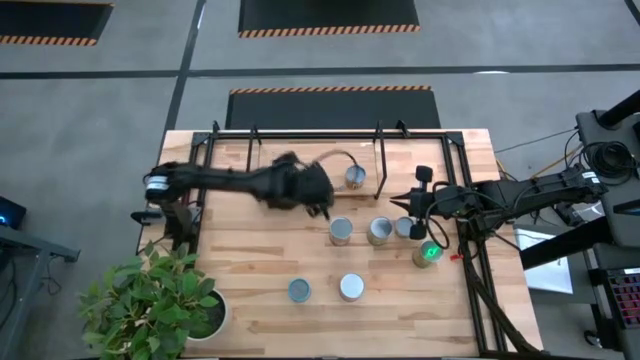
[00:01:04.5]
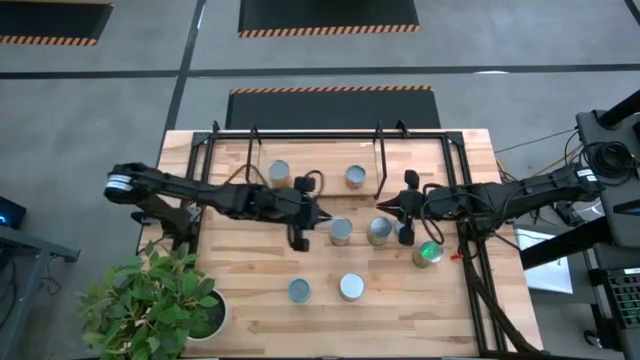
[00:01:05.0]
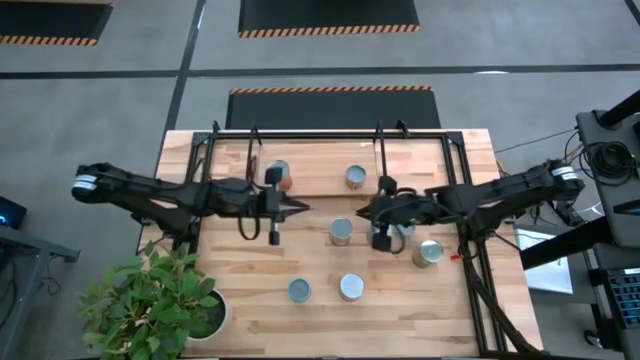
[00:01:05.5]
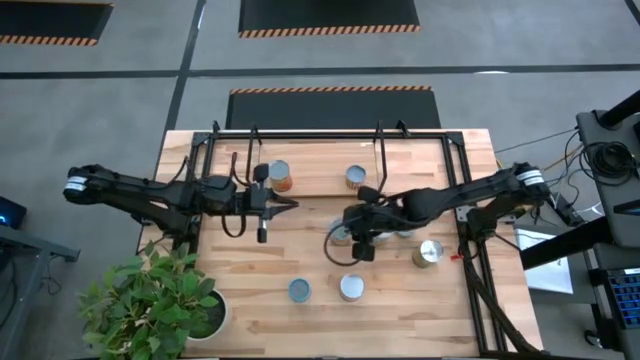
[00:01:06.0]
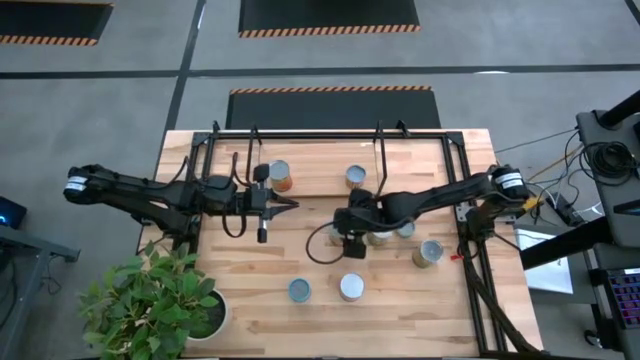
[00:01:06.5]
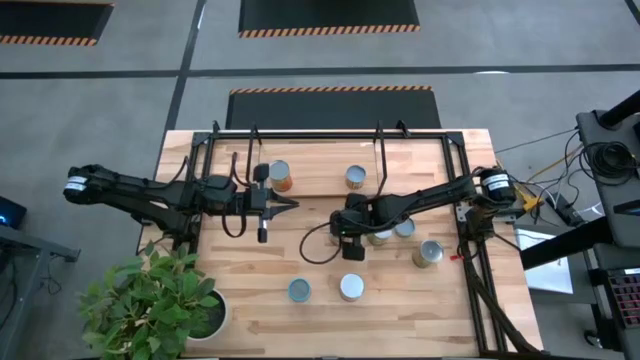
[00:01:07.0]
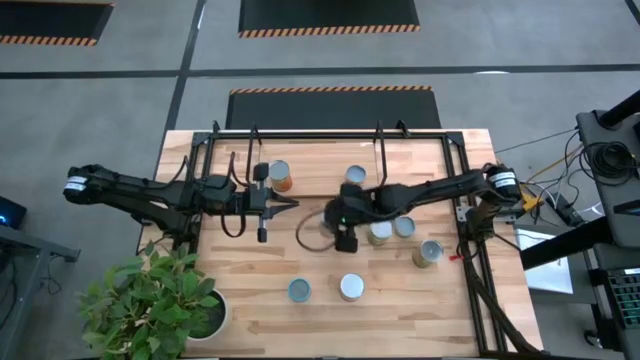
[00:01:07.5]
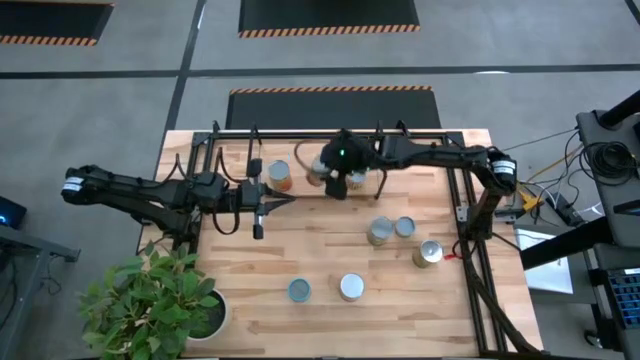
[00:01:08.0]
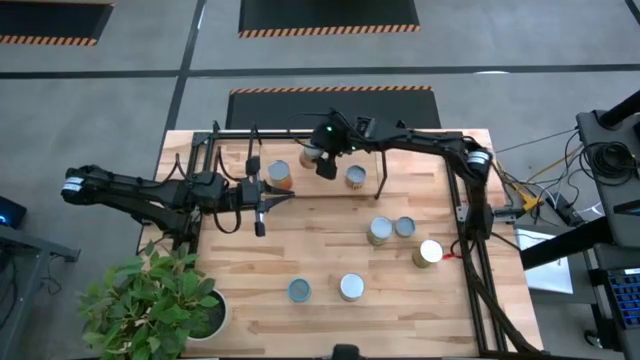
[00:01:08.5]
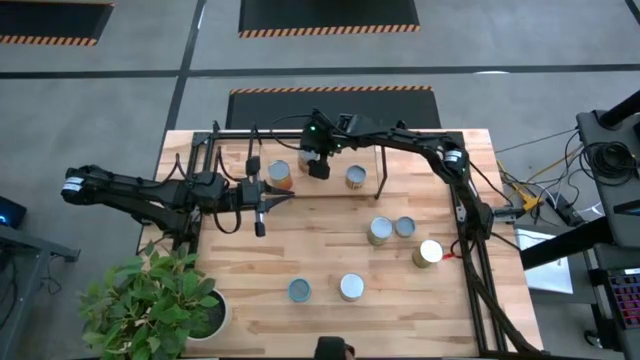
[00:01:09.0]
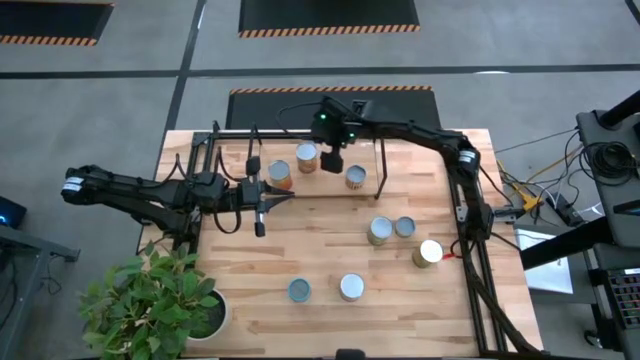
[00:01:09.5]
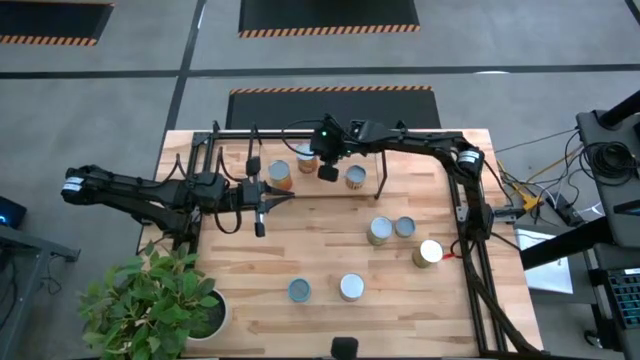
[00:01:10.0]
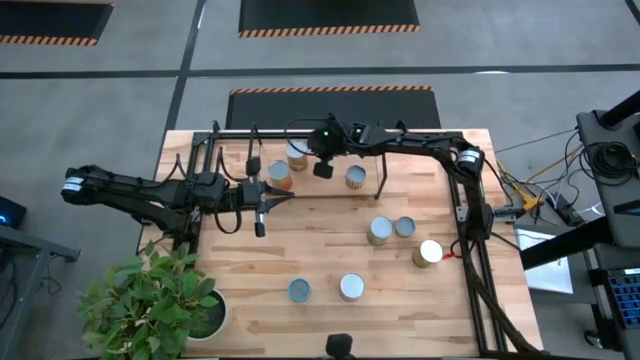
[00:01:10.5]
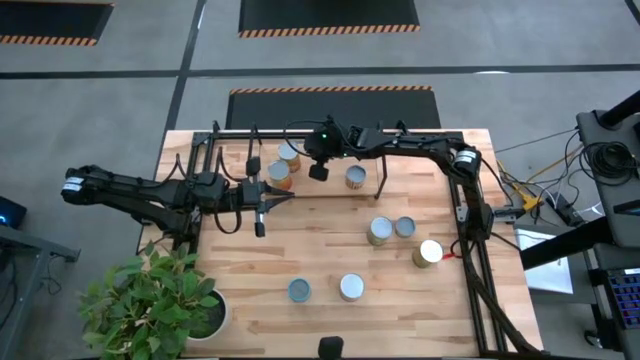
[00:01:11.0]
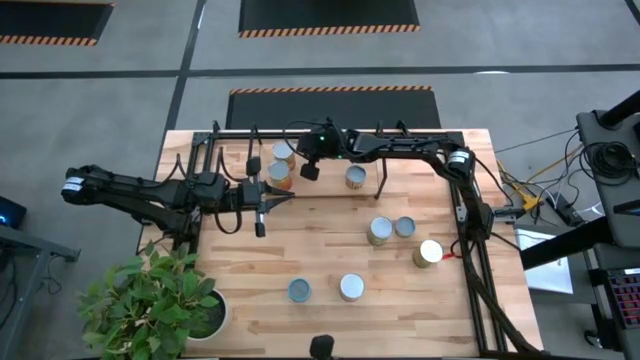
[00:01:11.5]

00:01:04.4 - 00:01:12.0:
Task: Pick and place cans onto a shelf
Put the top big orange canned corn on the shelf aligned with the other big orange canned bean

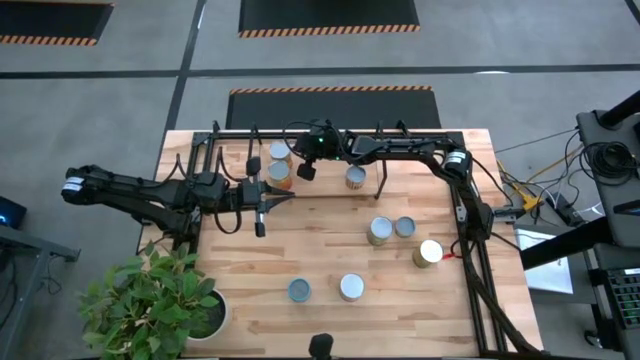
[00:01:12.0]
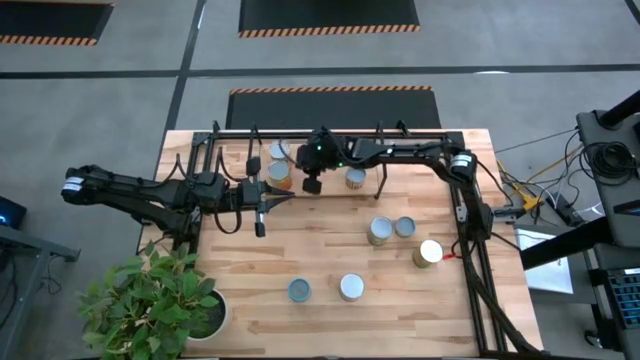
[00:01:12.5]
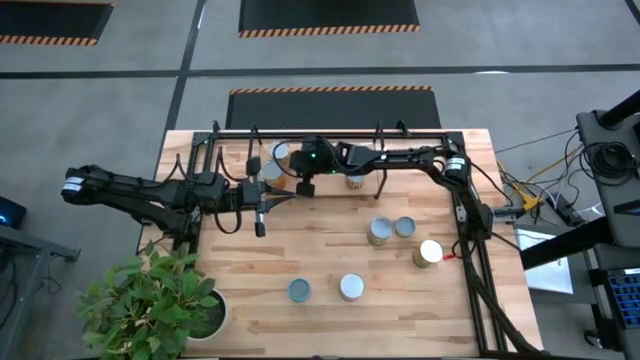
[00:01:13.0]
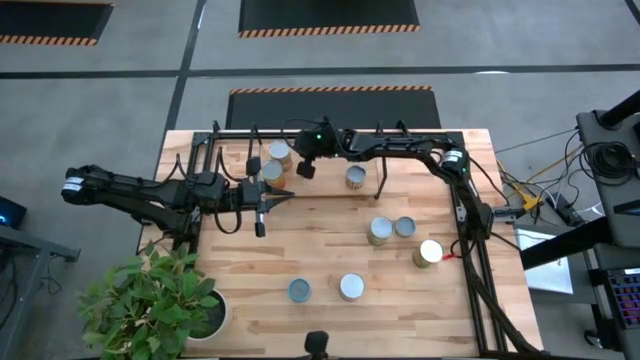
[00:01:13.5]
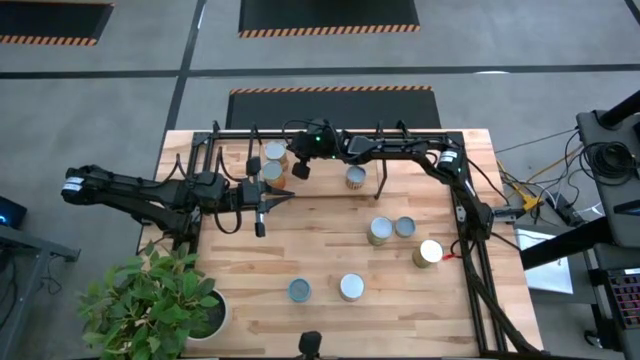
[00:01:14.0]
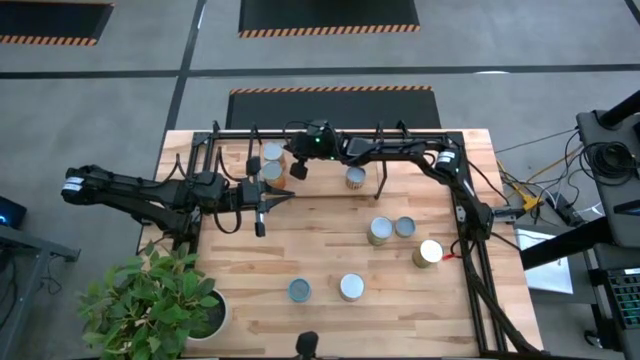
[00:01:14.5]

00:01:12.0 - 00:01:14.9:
Adjust the big orange cans on the shelf

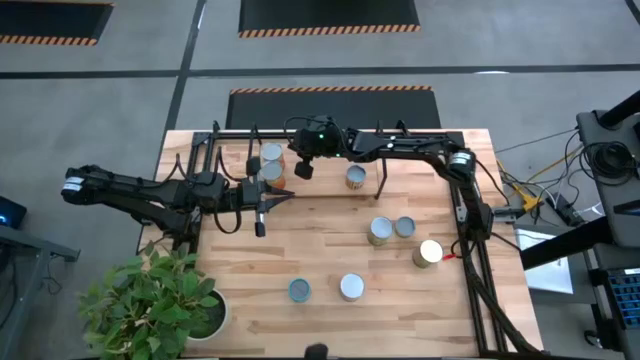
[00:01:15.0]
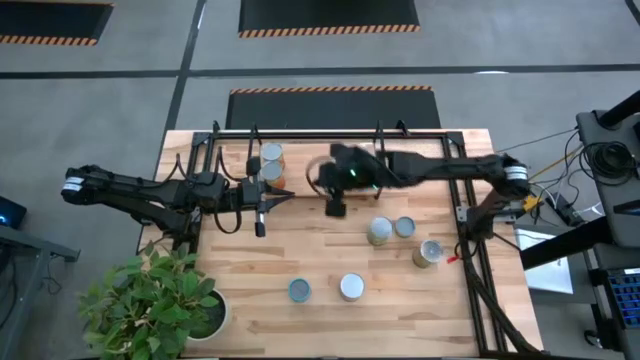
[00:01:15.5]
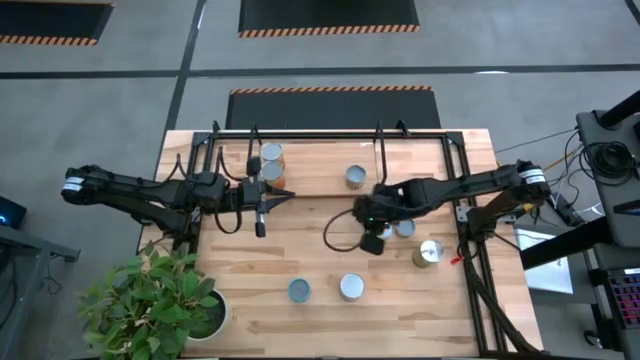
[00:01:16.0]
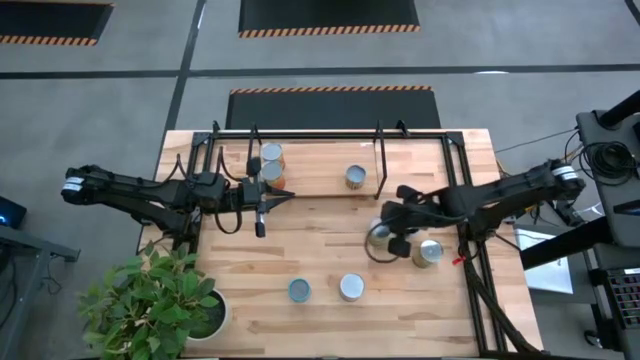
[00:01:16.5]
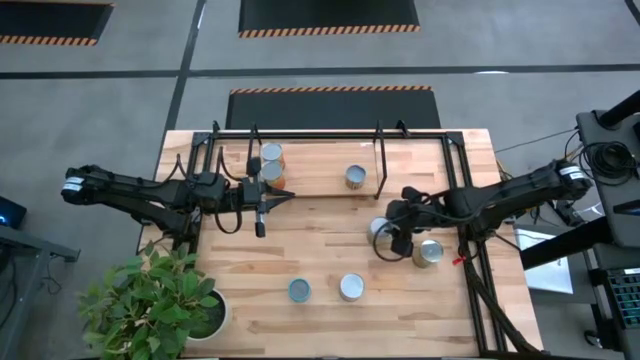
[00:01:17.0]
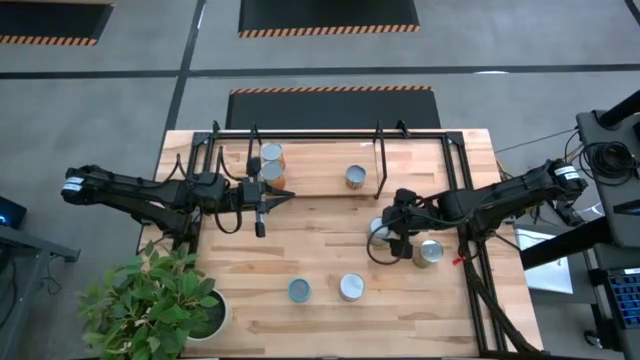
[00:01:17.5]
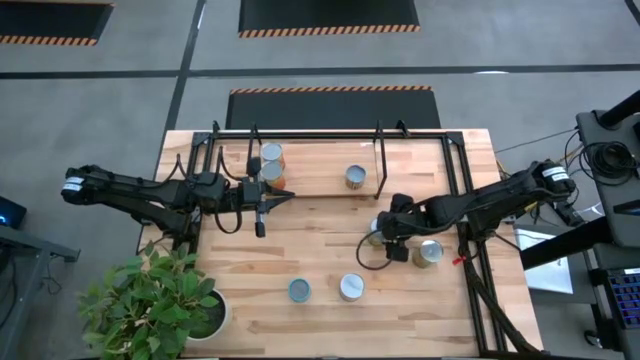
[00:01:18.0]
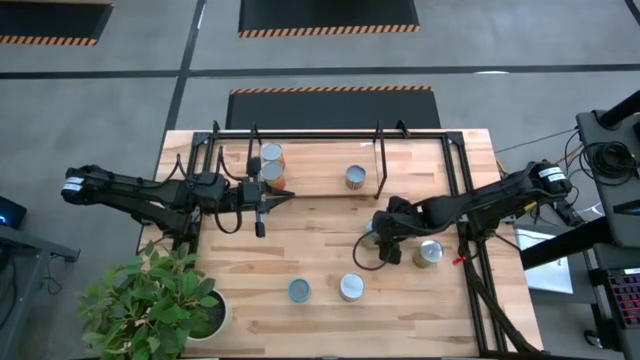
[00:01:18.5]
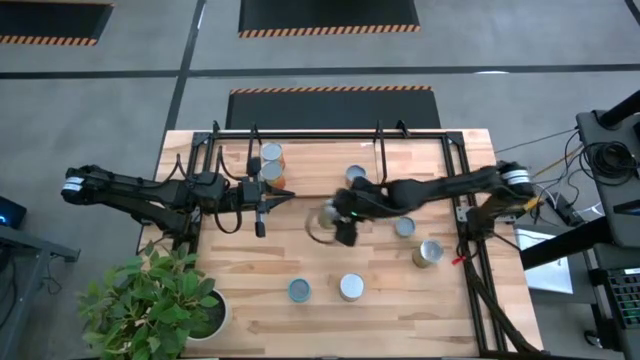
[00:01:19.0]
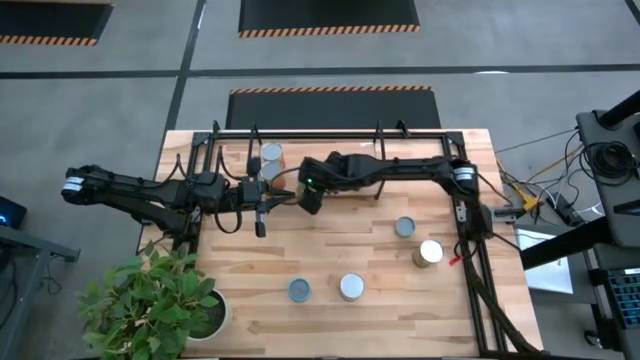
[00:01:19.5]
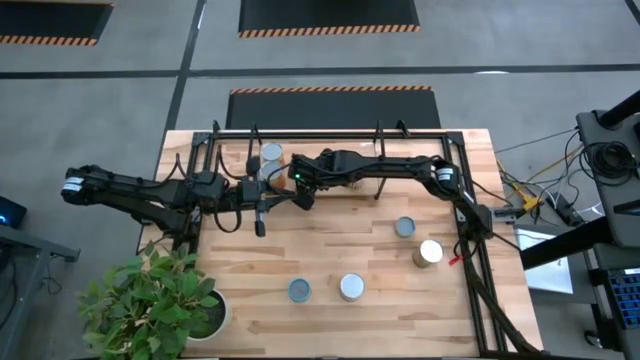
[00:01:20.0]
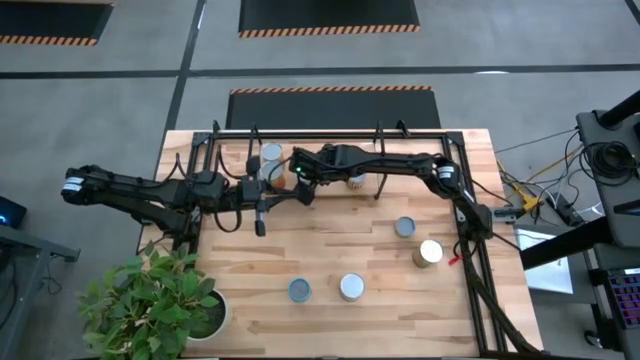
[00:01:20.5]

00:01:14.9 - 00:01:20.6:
Put the big green canned pear on the shelf

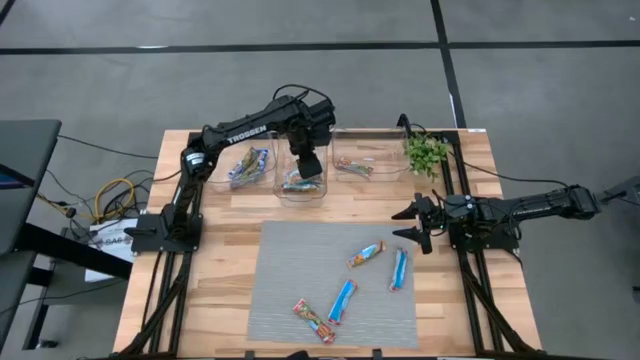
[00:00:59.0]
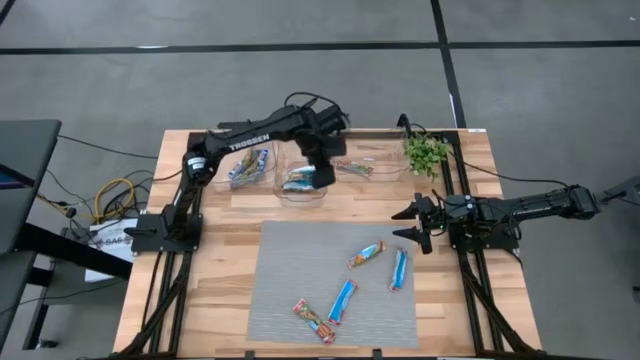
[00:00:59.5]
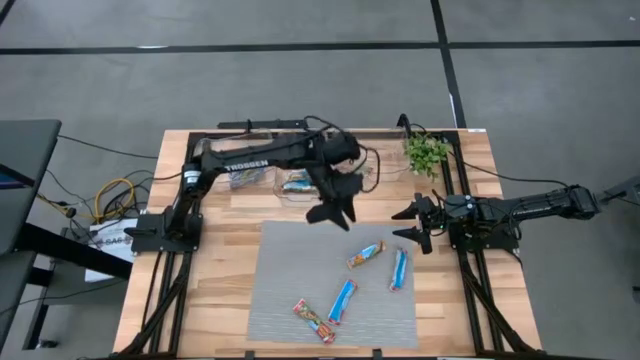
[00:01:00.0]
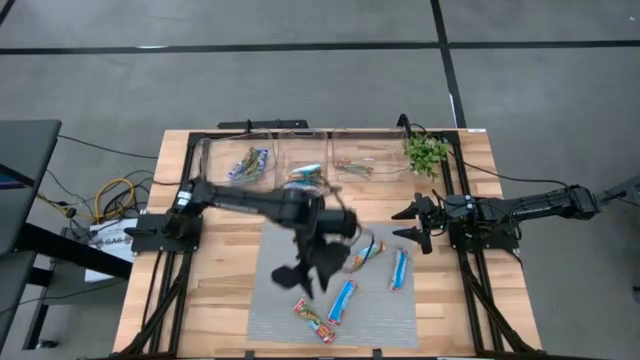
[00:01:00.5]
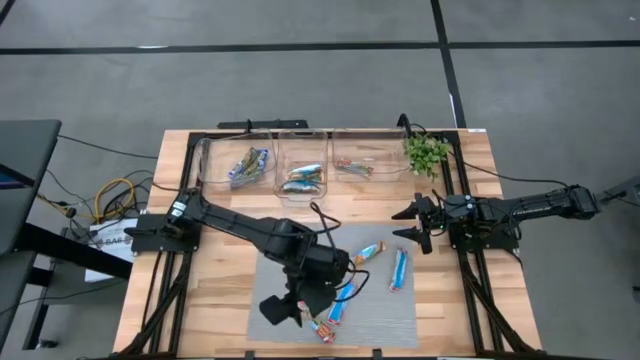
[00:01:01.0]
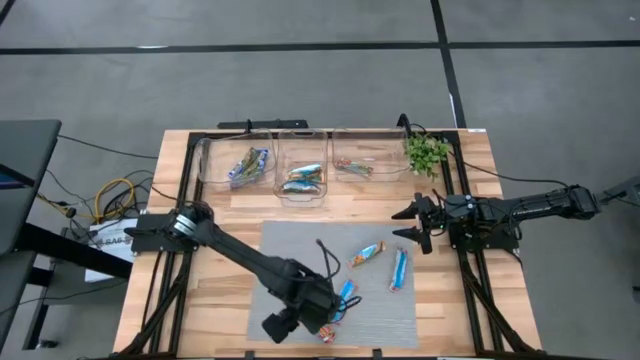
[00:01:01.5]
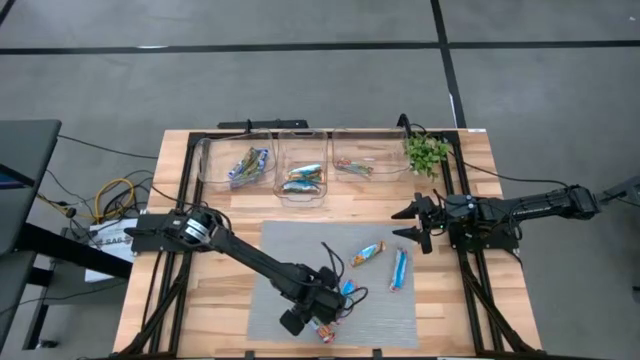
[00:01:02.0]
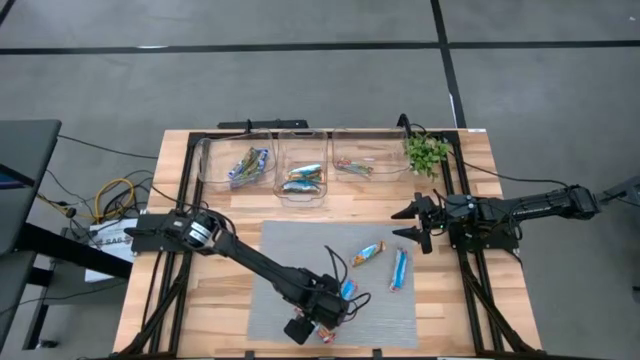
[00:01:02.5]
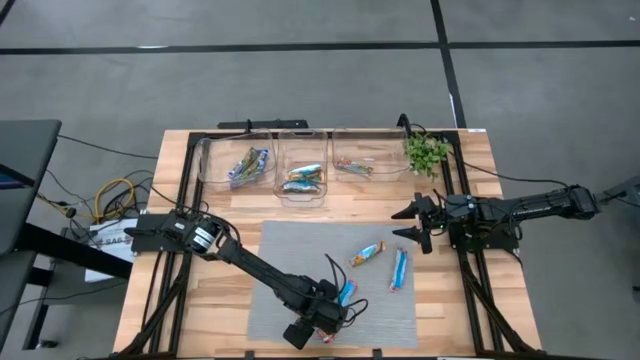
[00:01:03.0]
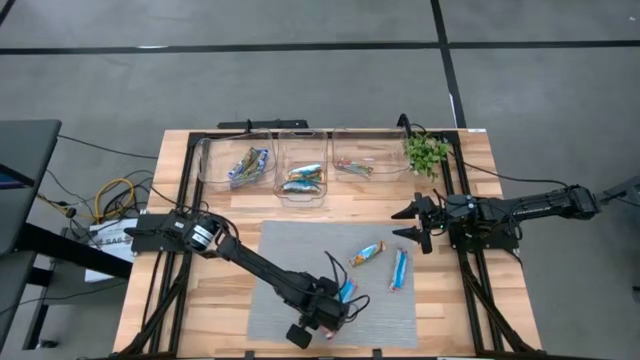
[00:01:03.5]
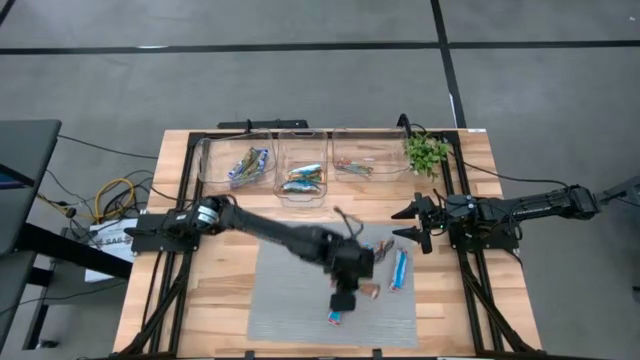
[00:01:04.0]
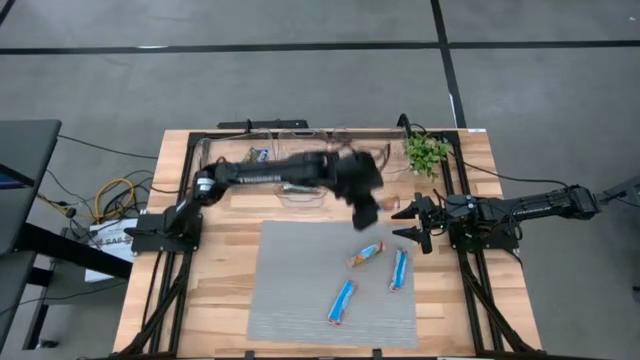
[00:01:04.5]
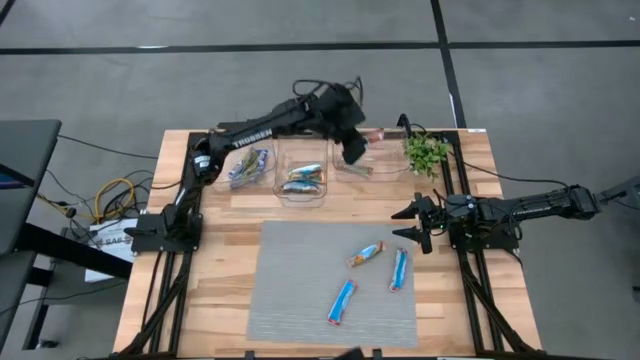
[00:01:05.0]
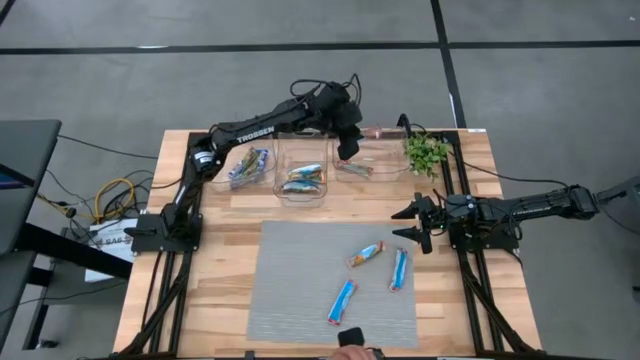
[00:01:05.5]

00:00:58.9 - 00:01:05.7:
Task: Pick and place Granola Bars by type
Put the red granola bar into the right transparent bin
